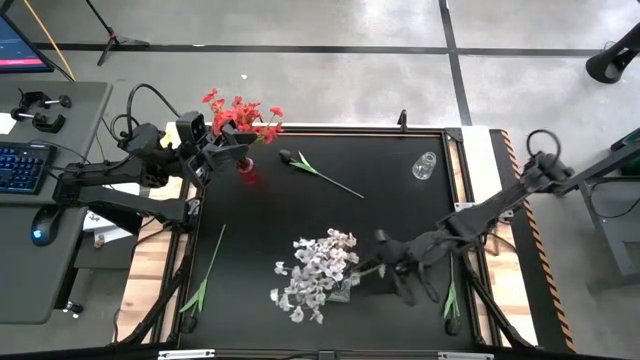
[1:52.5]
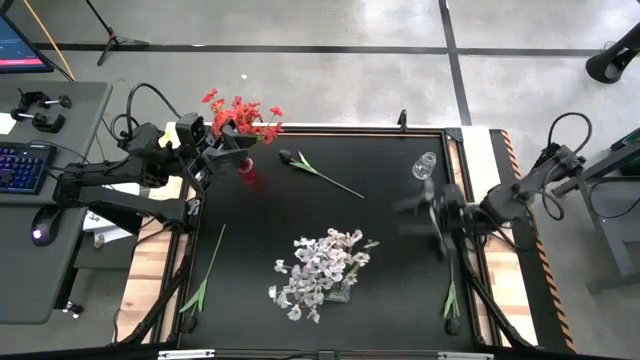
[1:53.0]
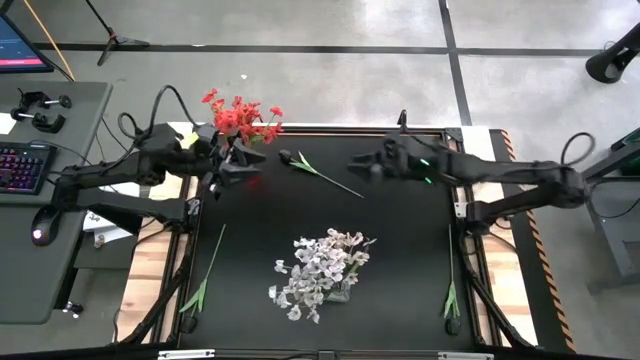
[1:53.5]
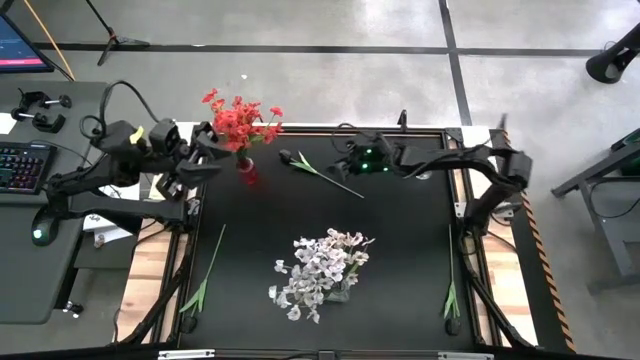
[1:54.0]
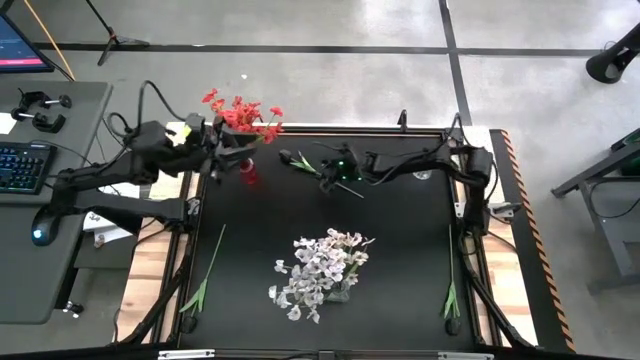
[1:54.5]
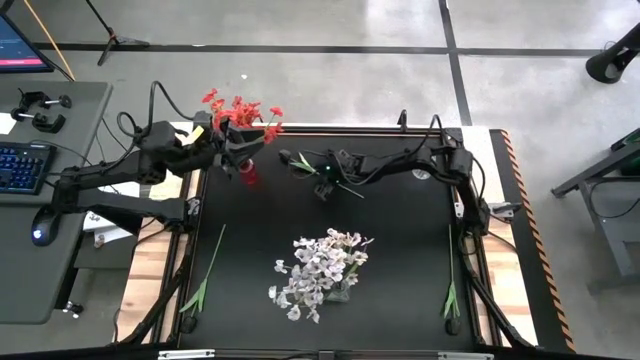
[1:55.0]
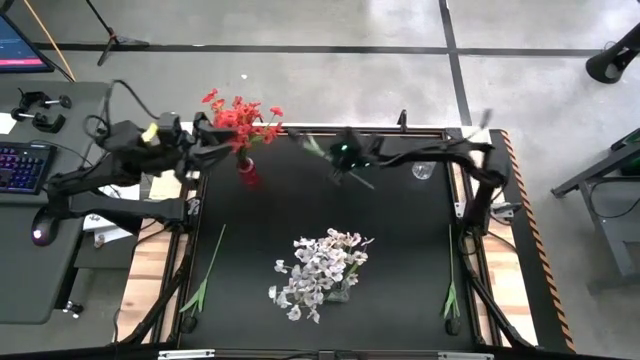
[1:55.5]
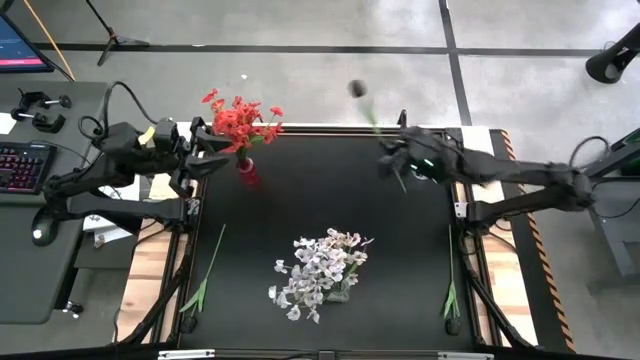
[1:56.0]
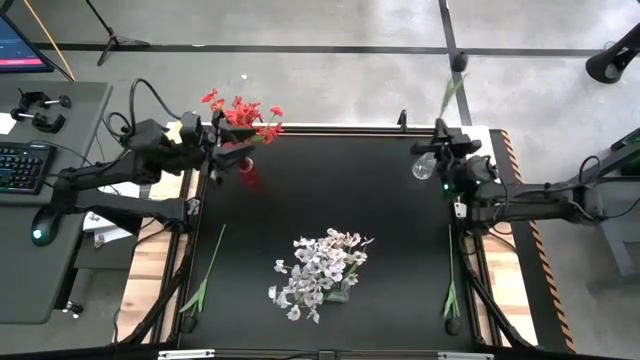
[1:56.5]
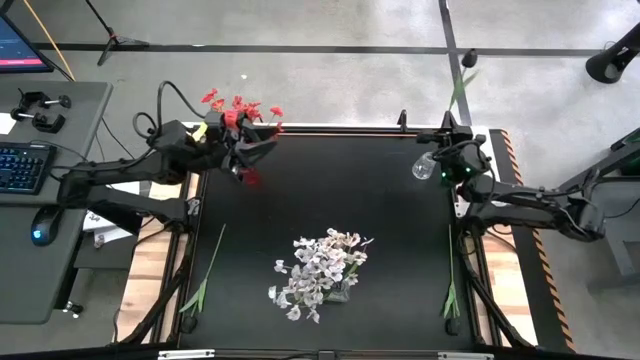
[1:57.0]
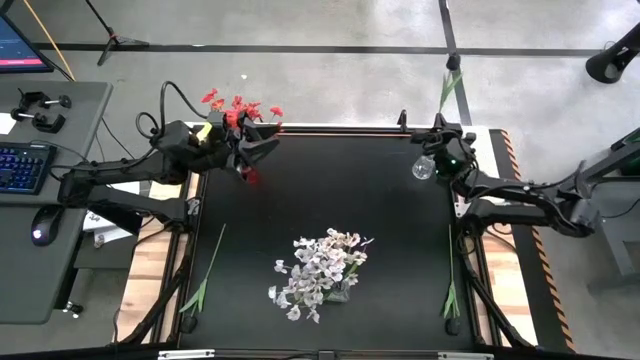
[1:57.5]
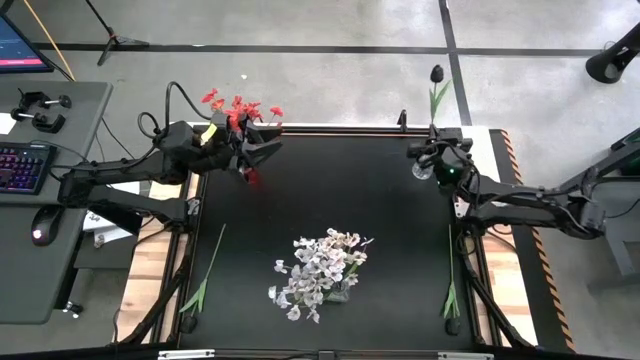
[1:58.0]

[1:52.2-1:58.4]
Task: Sort flowers into vase by color
Put the top black tulip into the top transparent vase

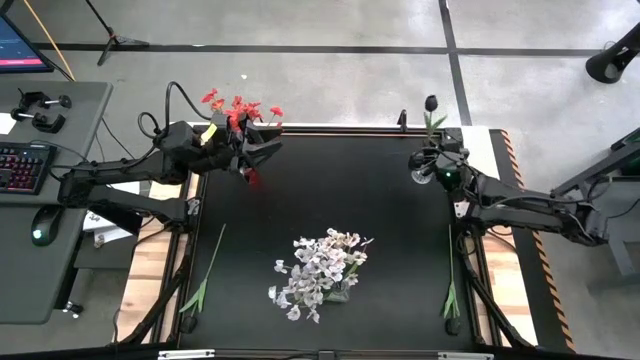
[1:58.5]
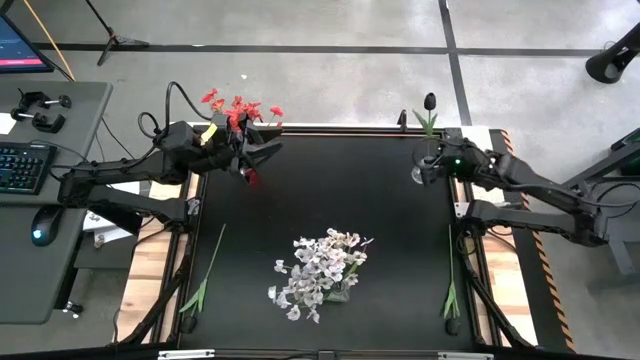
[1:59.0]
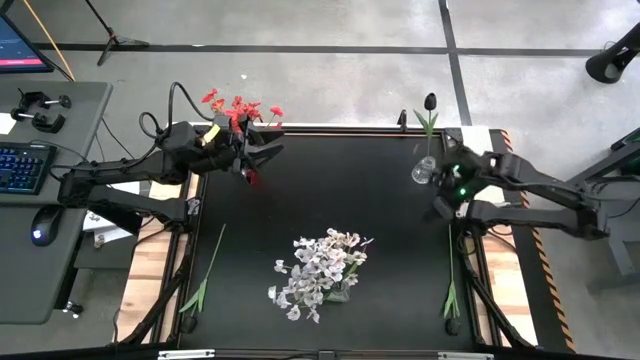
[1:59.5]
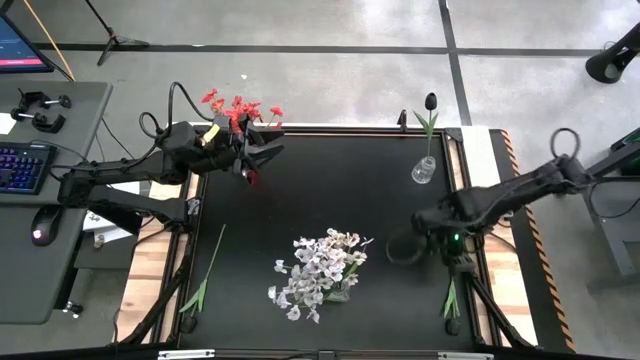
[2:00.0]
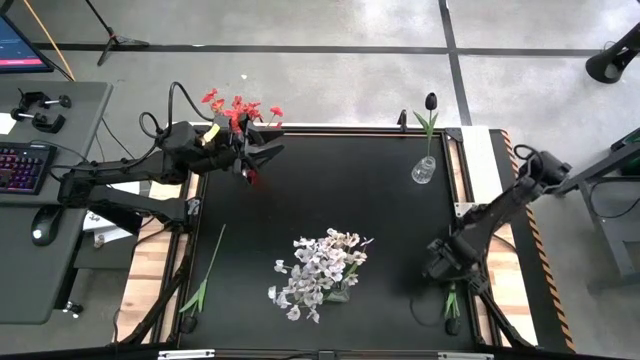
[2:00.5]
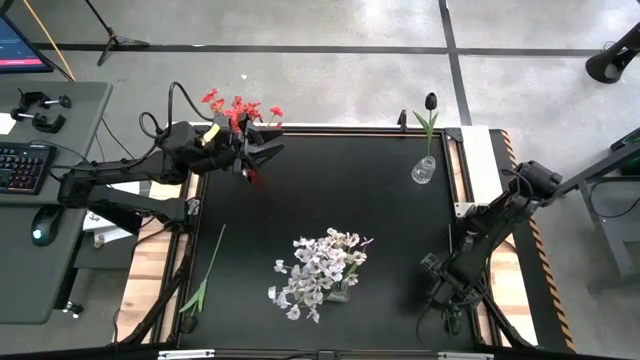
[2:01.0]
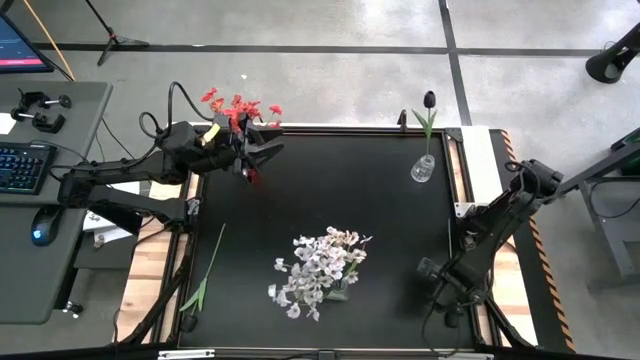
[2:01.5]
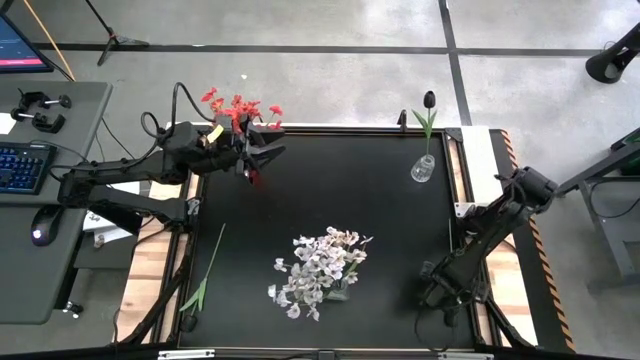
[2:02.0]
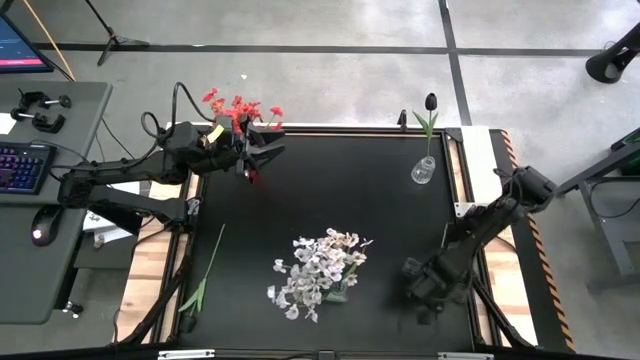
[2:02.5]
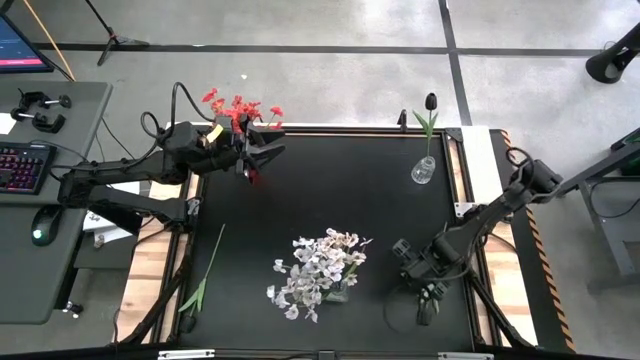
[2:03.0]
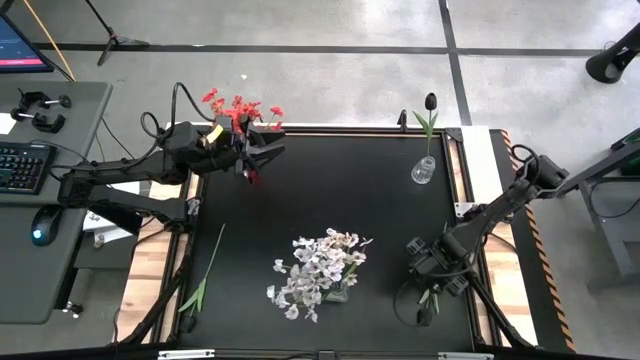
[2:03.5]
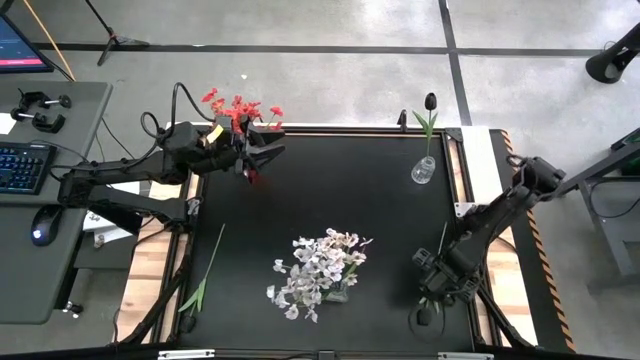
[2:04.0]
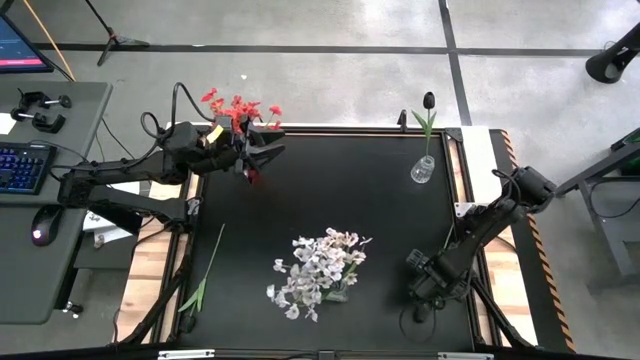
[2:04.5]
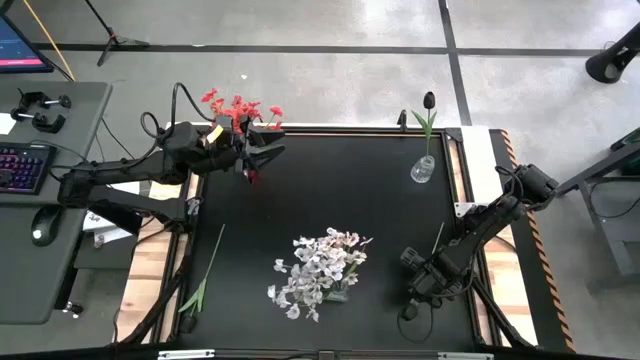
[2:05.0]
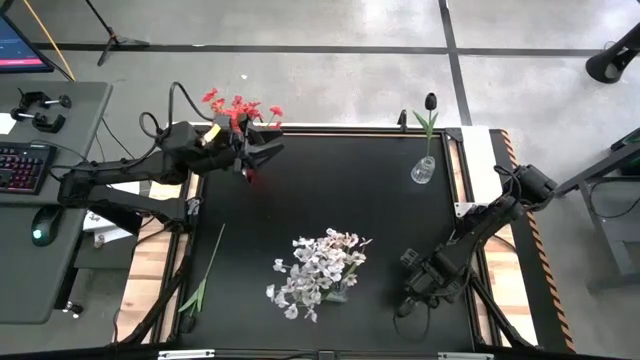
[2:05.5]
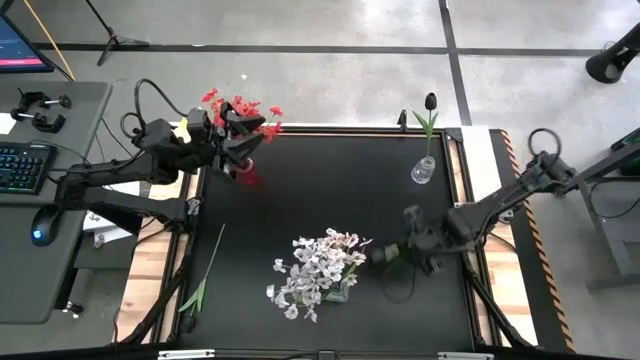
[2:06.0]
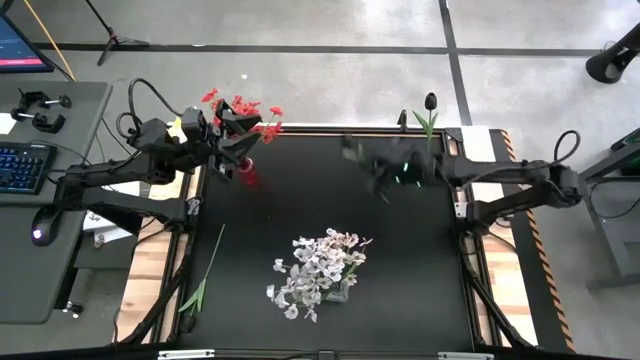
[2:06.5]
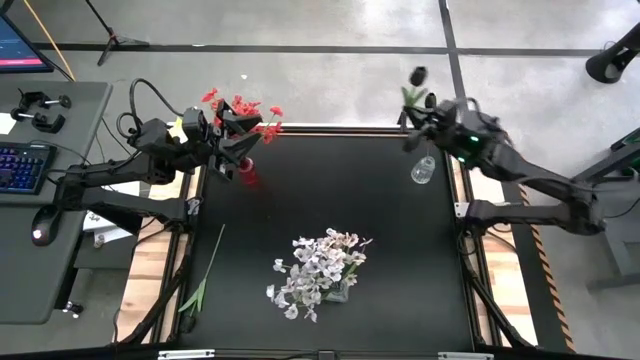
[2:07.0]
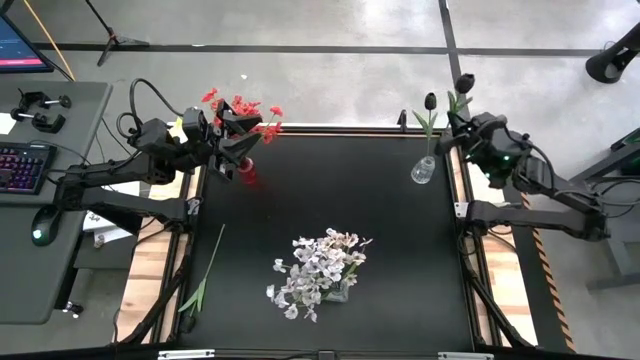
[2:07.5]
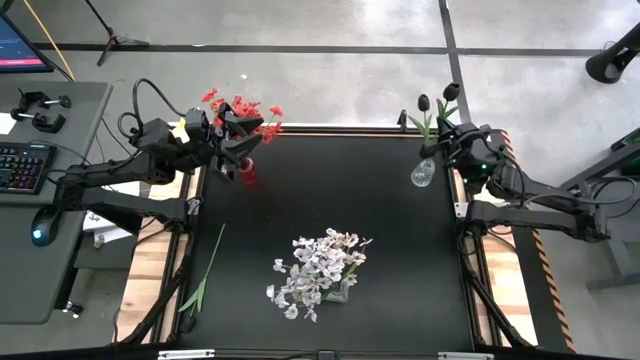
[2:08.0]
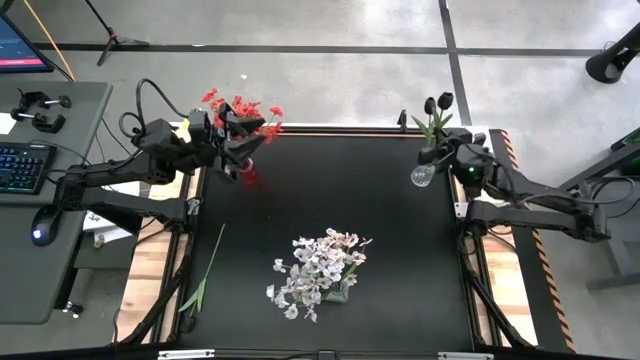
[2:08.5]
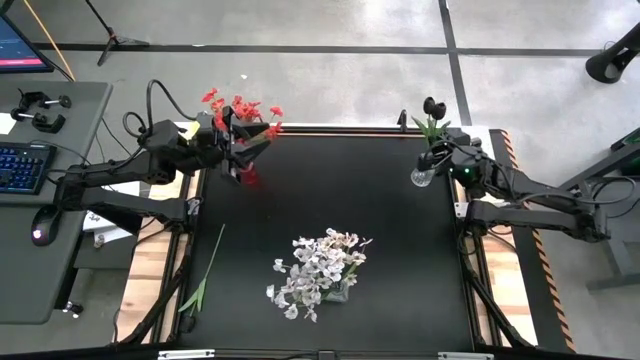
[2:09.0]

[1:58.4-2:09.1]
Put the right black tulip into the top transparent vase

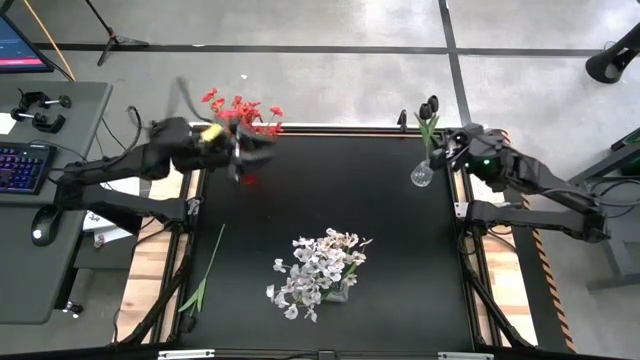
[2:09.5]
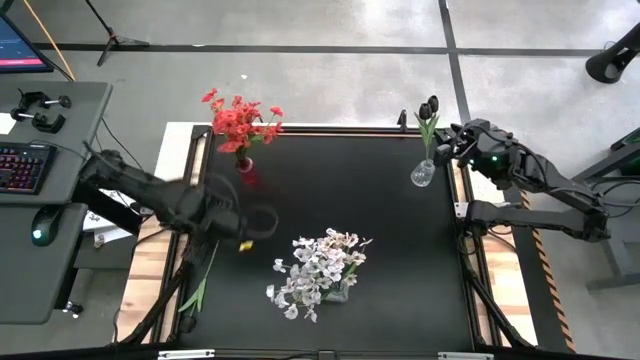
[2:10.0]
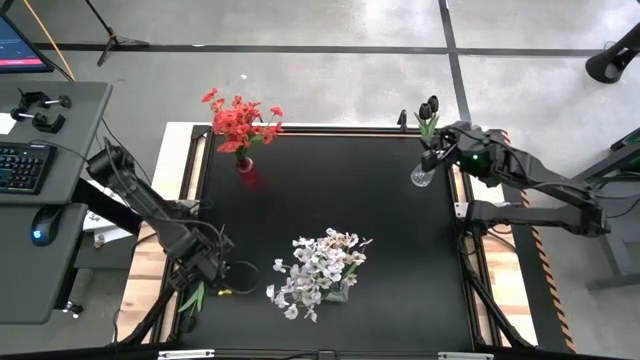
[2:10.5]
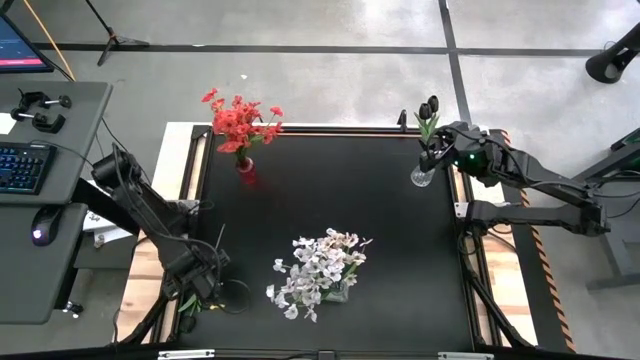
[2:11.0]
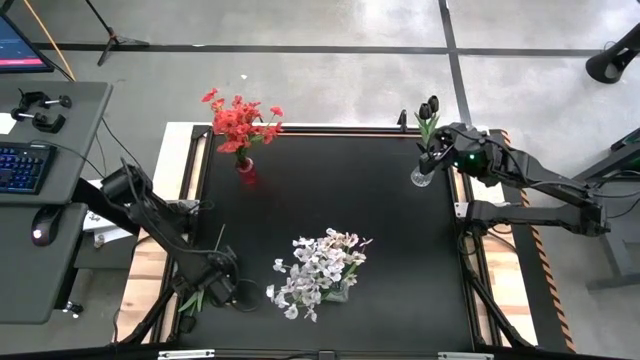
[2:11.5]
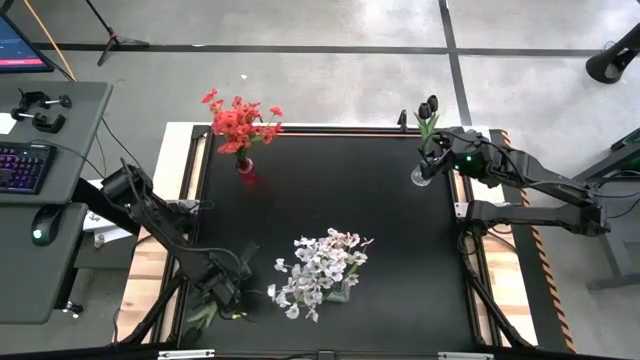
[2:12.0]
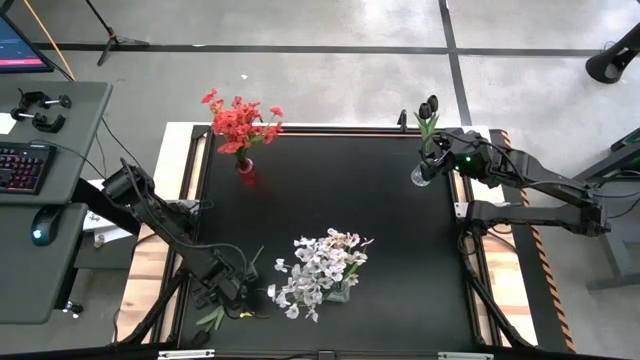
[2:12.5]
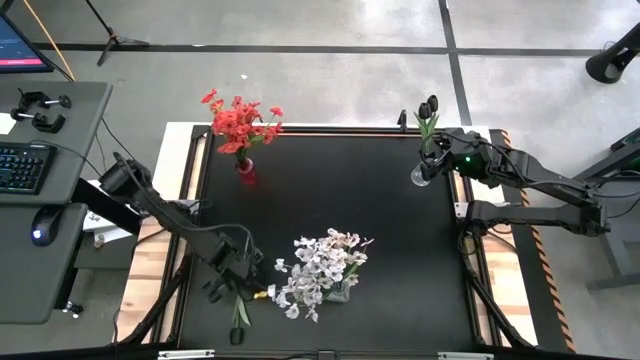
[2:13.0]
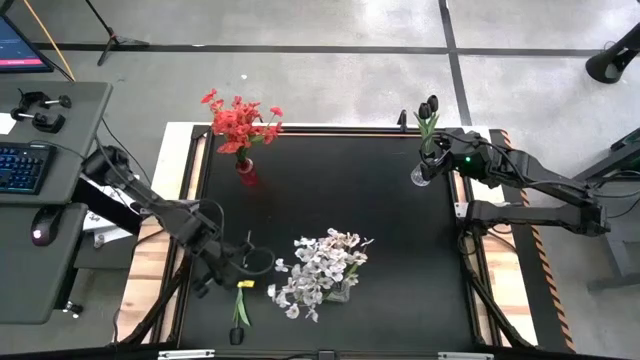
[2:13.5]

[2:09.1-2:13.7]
Put the black tulip into the top transparent vase
